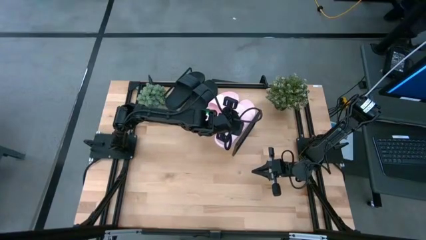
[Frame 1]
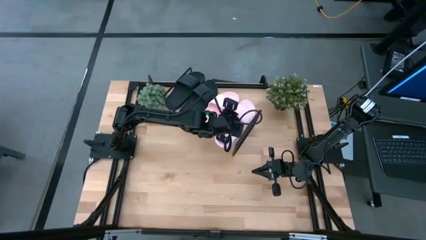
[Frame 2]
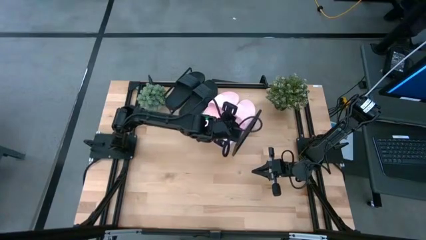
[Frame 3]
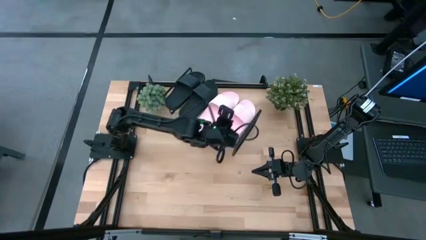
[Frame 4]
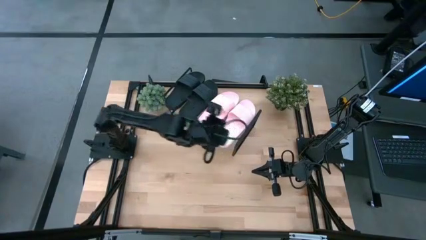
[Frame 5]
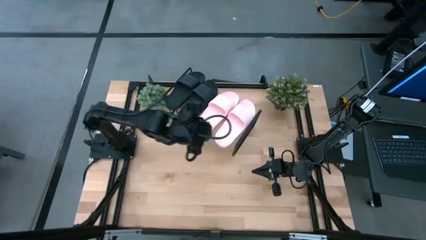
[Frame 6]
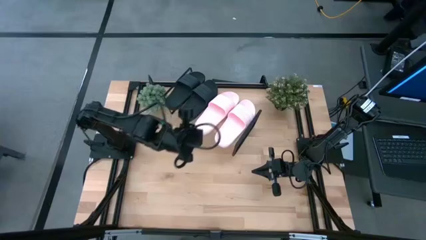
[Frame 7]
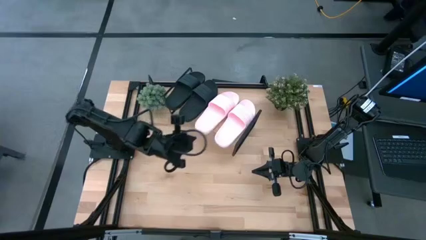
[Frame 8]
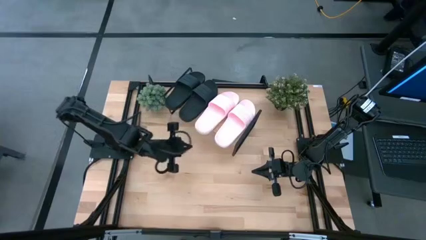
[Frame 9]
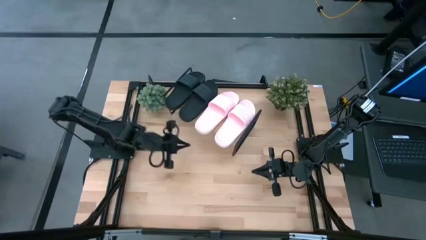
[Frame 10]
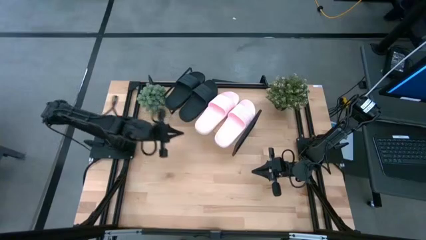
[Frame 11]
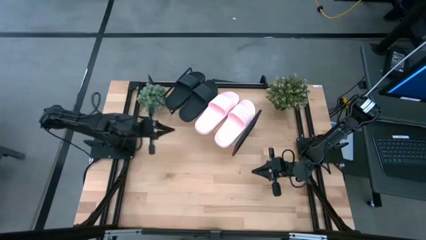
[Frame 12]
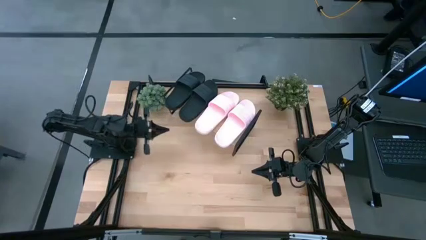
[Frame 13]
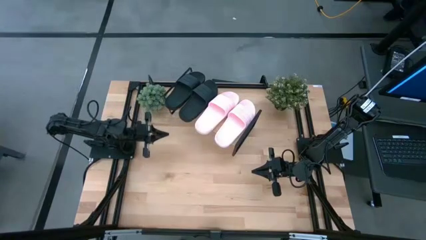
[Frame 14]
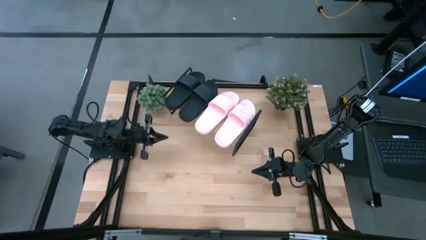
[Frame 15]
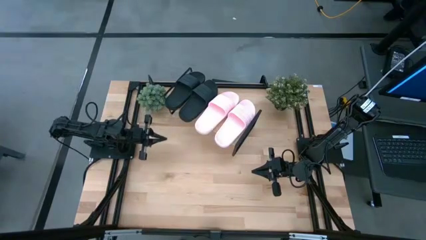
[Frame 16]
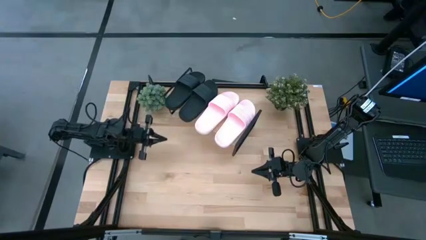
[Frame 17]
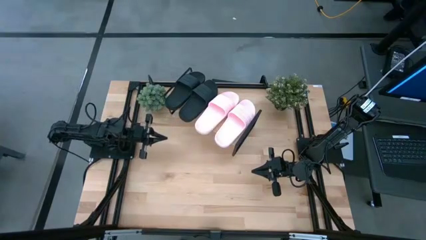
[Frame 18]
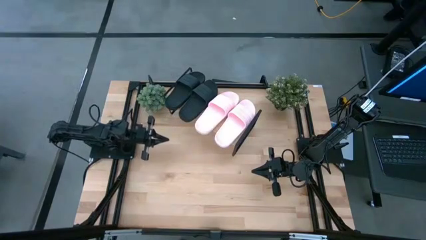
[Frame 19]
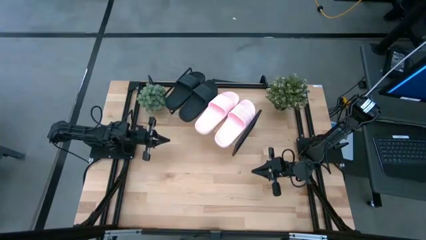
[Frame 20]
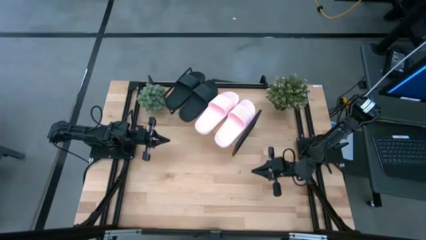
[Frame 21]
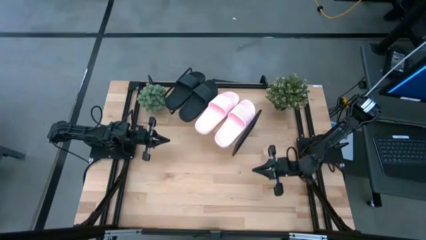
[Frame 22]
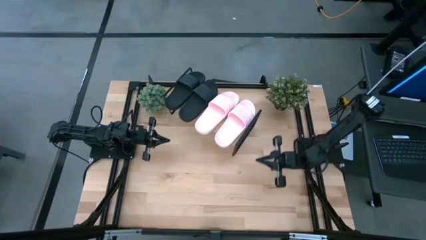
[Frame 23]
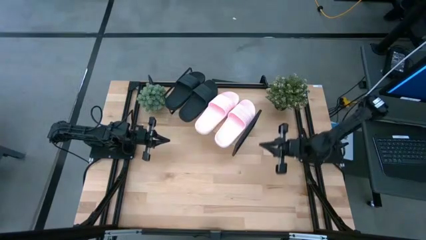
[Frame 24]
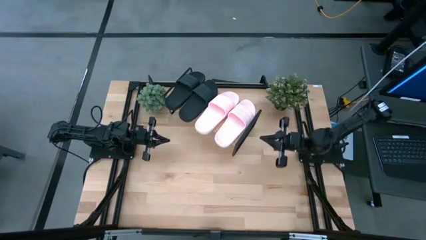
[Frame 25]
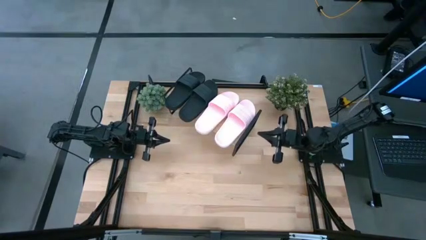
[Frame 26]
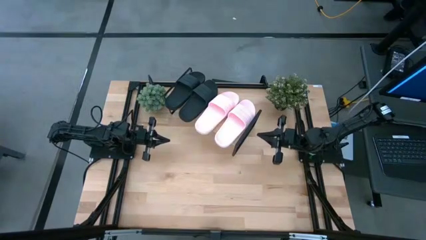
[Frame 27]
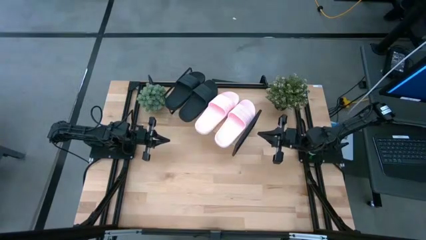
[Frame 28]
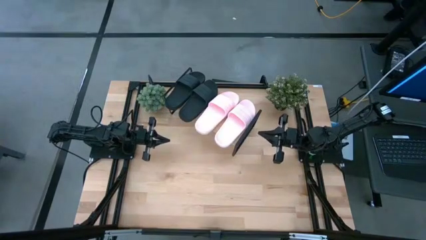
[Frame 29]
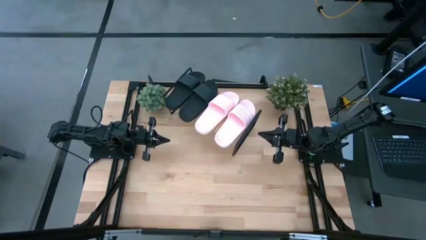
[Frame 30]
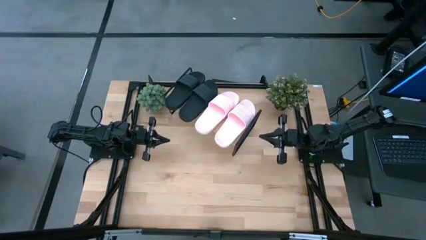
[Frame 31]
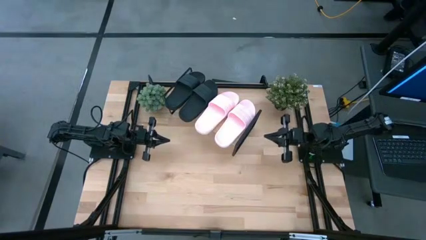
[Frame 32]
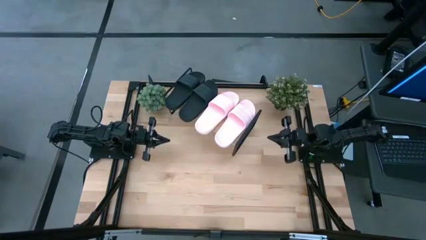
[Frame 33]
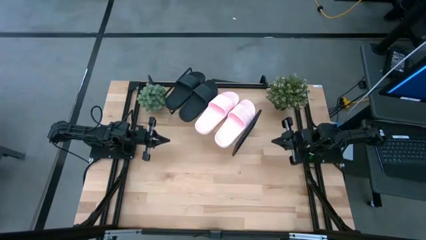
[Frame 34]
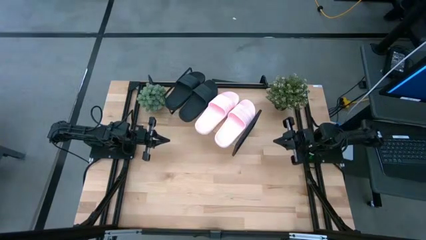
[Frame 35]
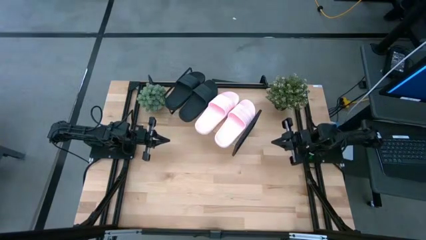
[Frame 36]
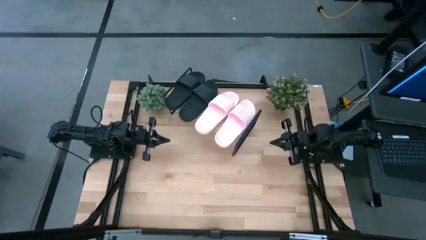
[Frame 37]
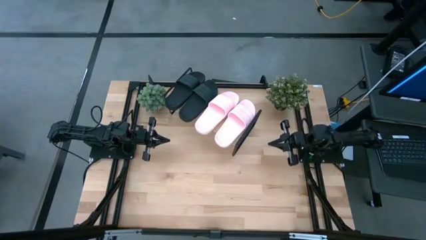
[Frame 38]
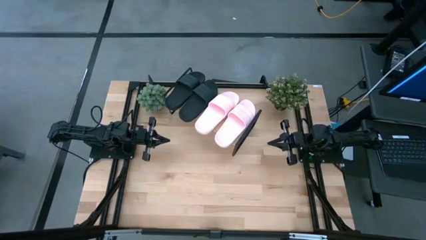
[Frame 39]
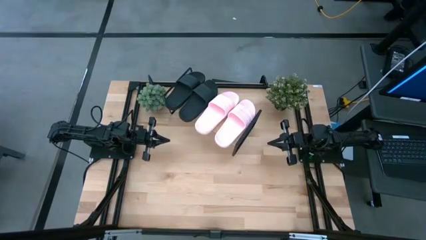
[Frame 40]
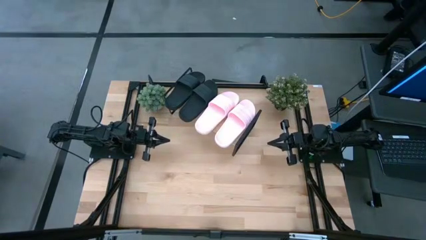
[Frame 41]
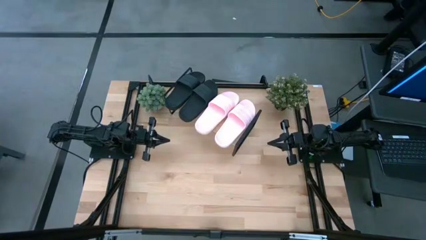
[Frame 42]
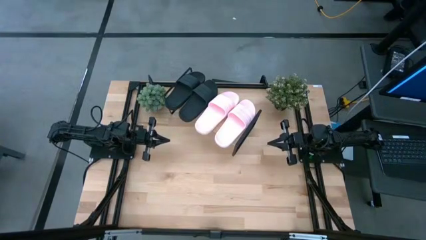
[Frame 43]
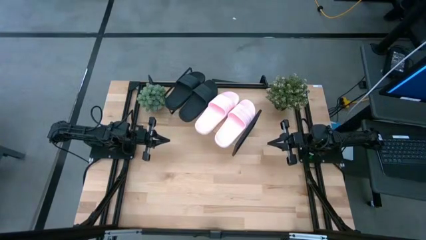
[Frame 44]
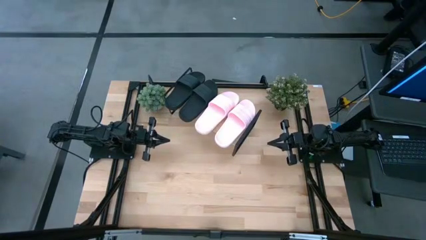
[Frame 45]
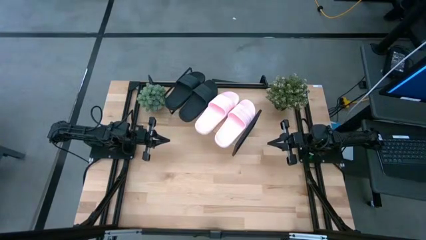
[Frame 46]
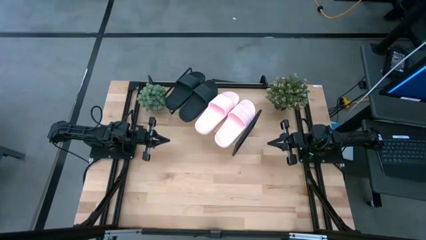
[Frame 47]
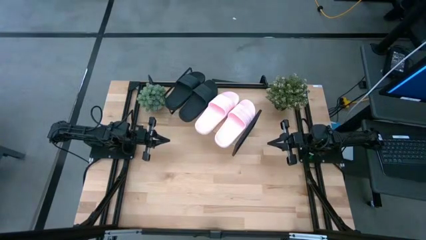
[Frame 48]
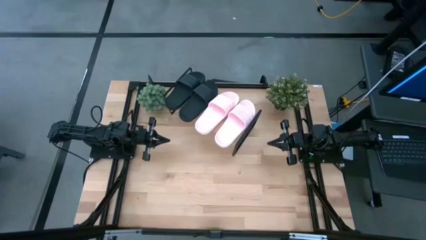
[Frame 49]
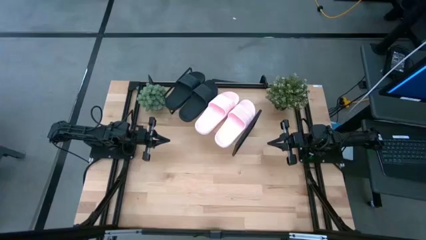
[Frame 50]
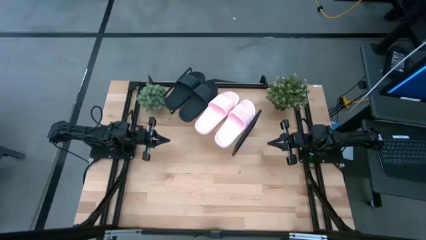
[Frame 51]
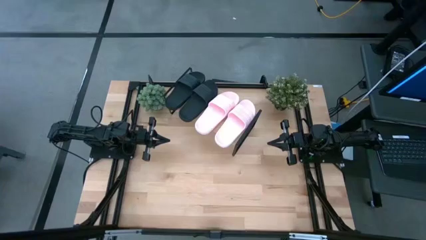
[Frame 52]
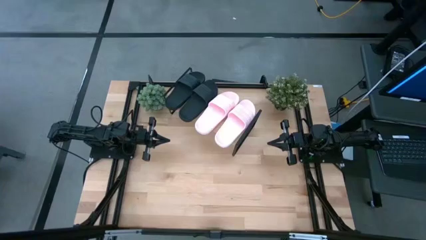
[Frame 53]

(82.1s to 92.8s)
Task: Pick and place slides into the shelf
Return to Home Position
